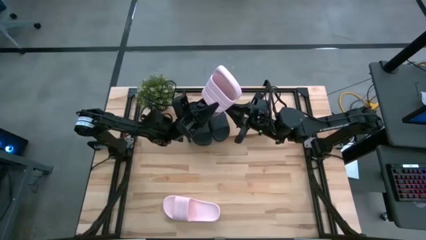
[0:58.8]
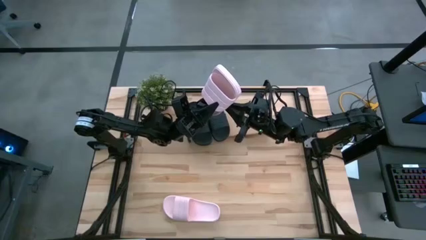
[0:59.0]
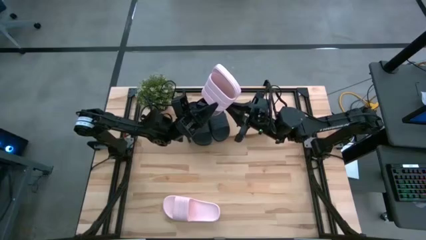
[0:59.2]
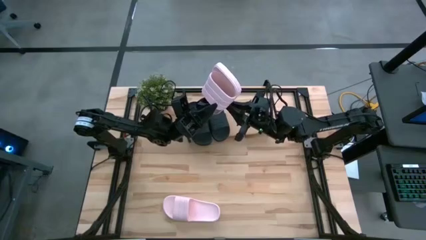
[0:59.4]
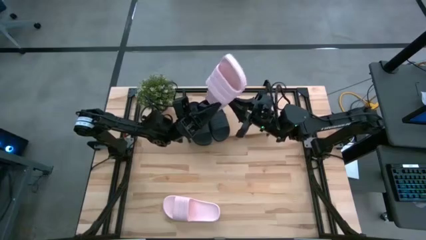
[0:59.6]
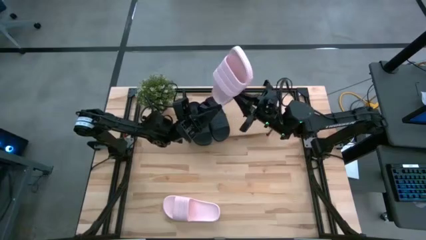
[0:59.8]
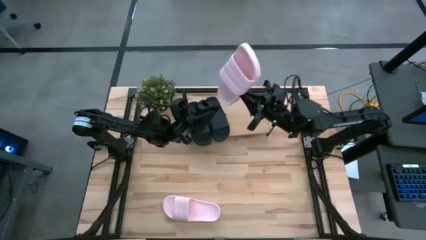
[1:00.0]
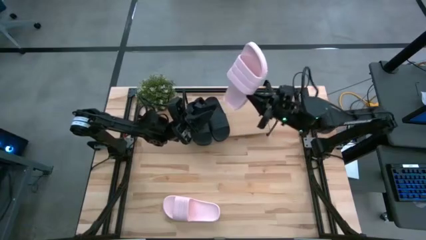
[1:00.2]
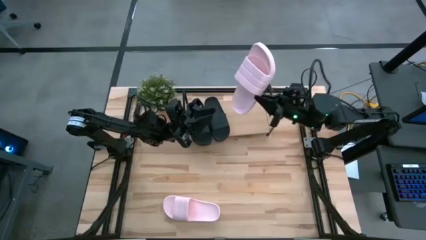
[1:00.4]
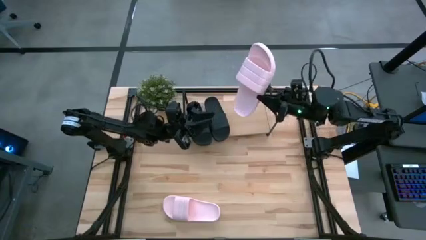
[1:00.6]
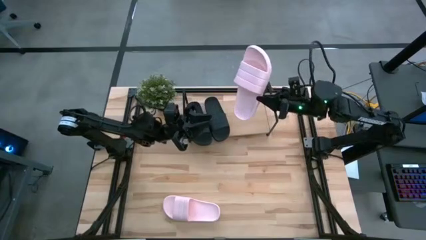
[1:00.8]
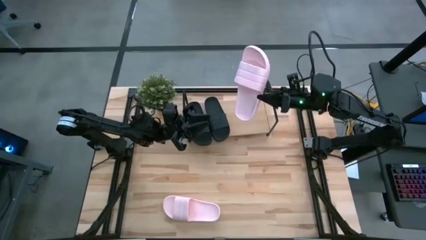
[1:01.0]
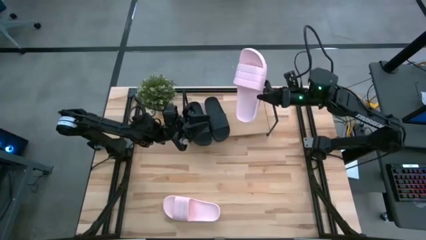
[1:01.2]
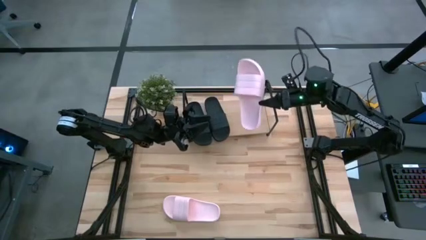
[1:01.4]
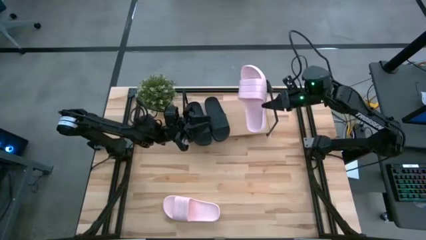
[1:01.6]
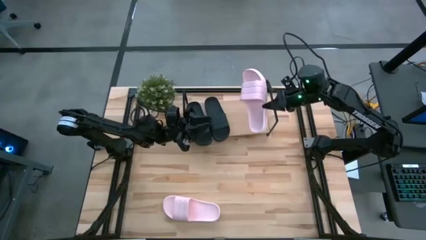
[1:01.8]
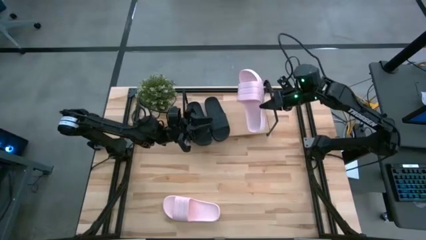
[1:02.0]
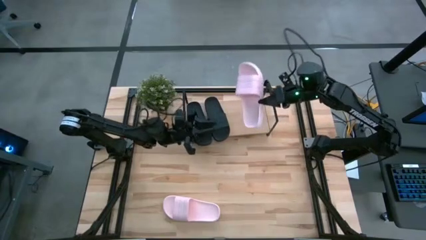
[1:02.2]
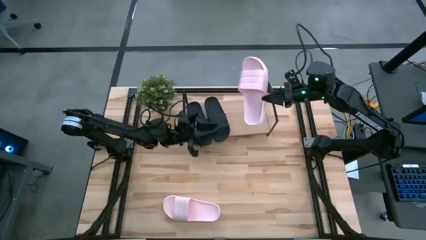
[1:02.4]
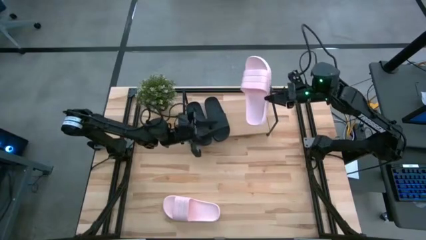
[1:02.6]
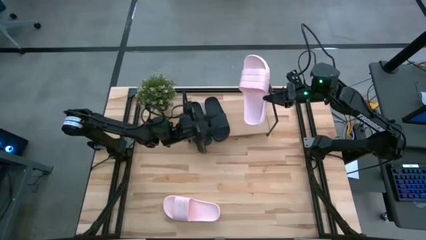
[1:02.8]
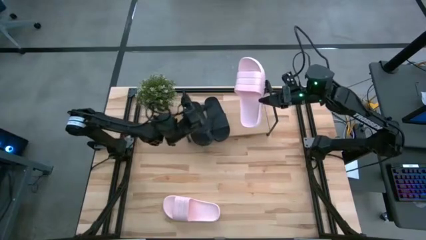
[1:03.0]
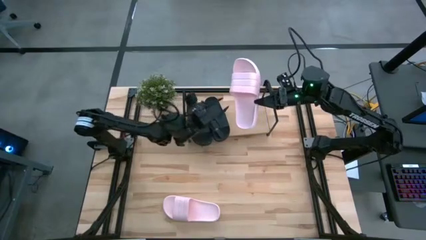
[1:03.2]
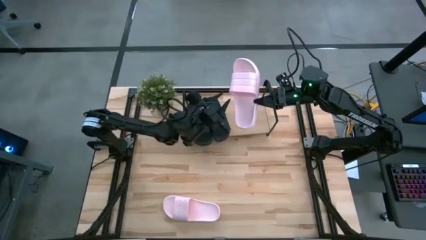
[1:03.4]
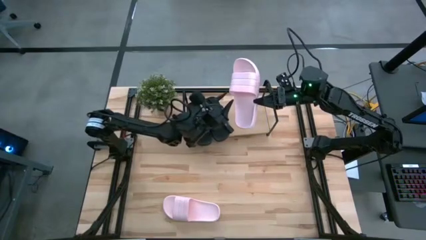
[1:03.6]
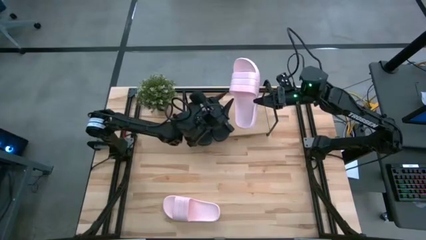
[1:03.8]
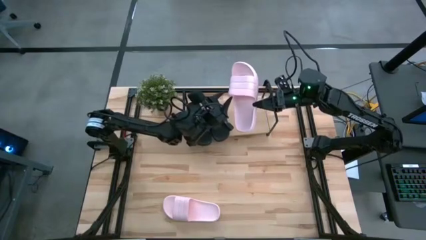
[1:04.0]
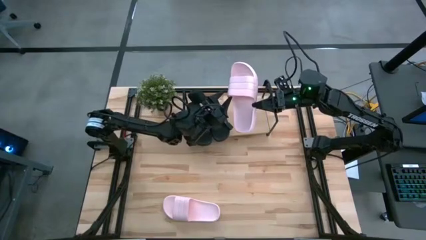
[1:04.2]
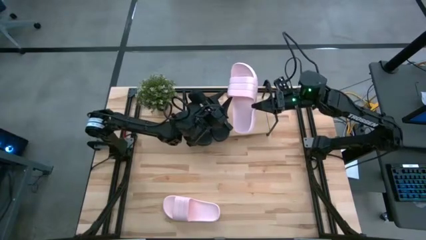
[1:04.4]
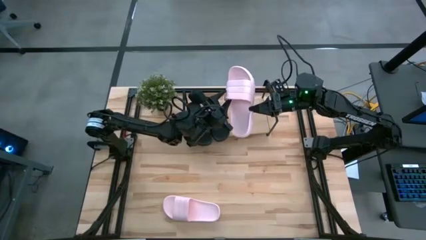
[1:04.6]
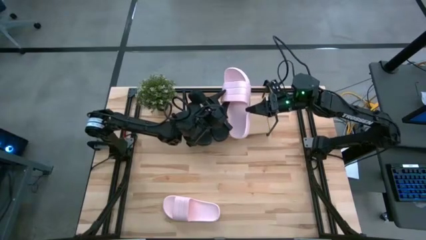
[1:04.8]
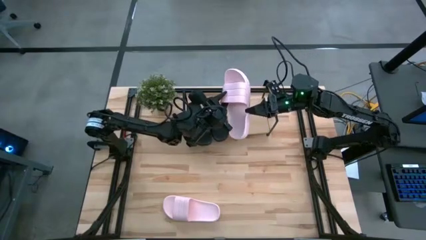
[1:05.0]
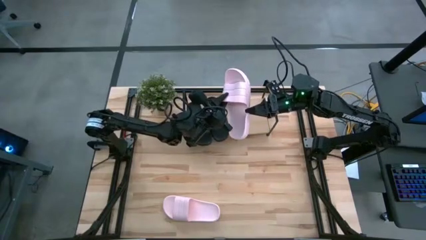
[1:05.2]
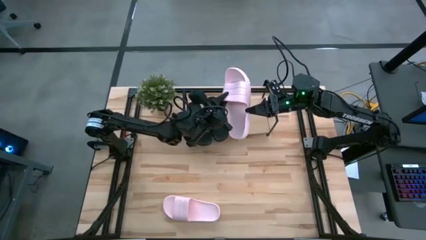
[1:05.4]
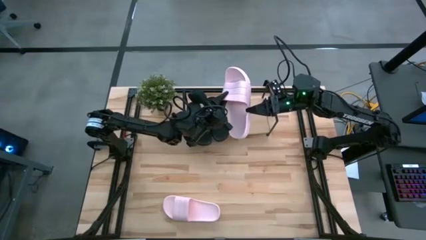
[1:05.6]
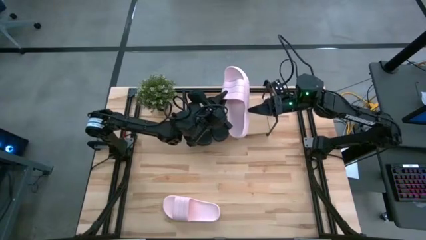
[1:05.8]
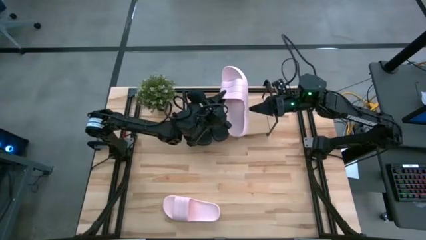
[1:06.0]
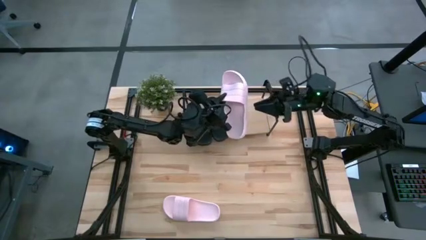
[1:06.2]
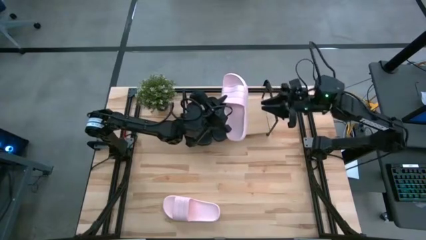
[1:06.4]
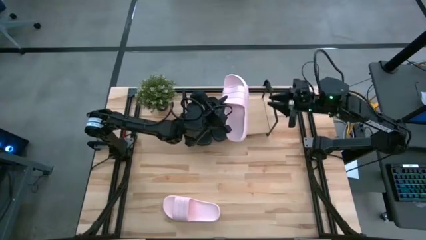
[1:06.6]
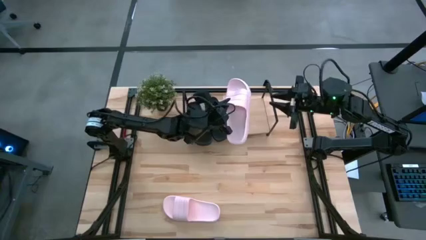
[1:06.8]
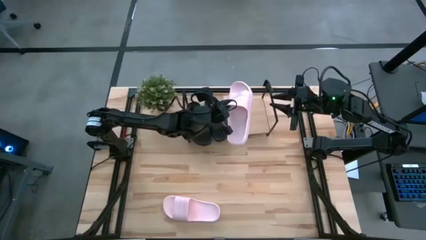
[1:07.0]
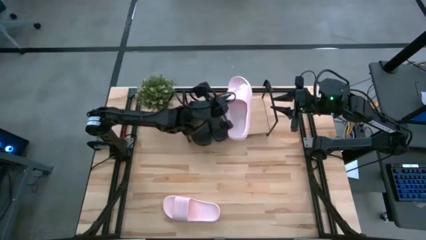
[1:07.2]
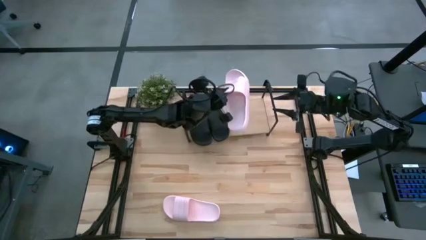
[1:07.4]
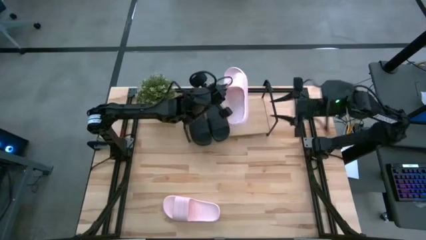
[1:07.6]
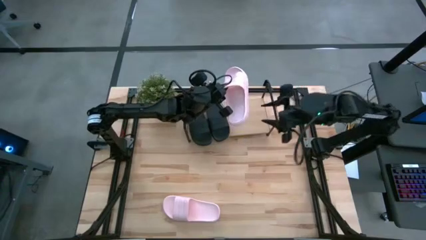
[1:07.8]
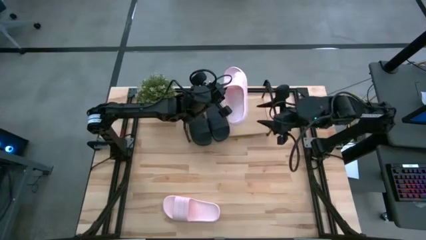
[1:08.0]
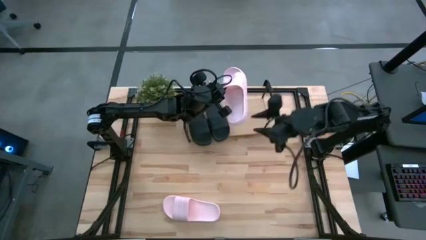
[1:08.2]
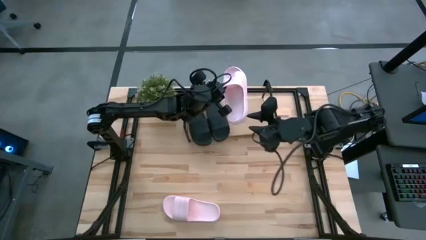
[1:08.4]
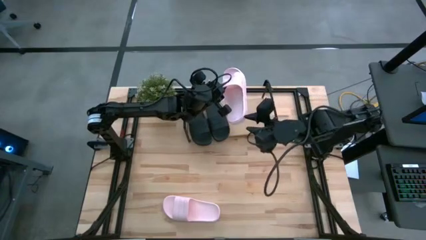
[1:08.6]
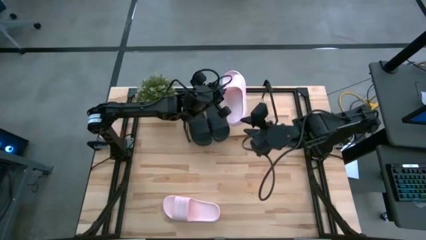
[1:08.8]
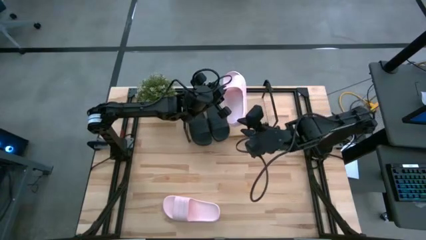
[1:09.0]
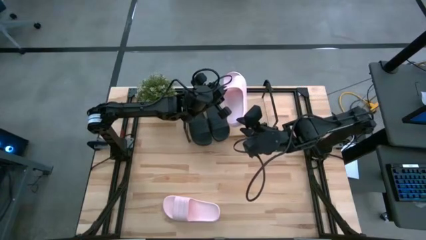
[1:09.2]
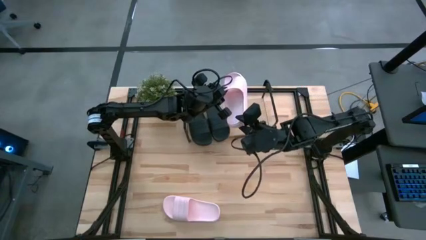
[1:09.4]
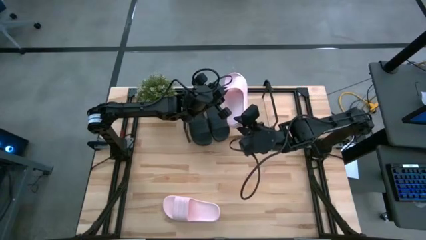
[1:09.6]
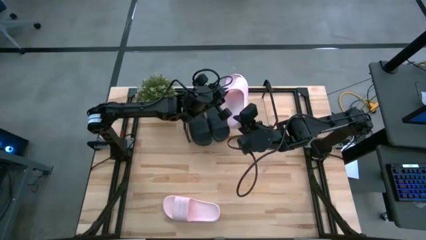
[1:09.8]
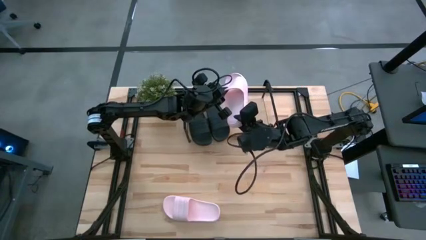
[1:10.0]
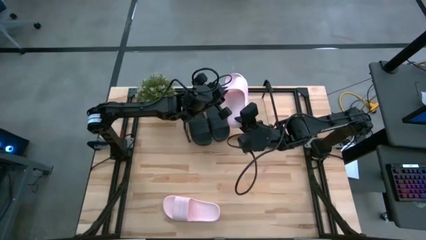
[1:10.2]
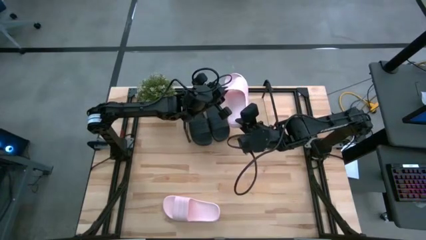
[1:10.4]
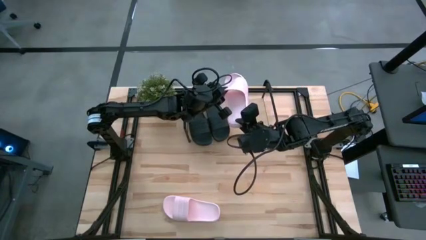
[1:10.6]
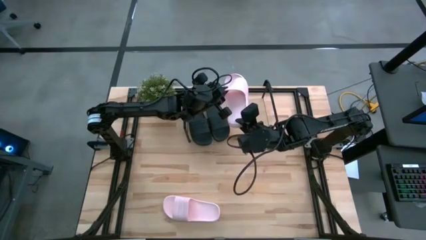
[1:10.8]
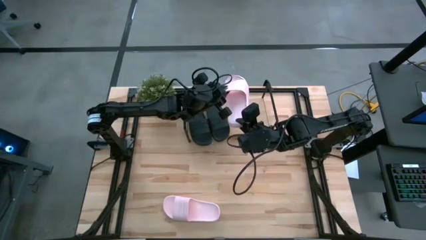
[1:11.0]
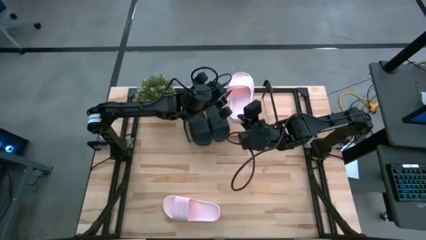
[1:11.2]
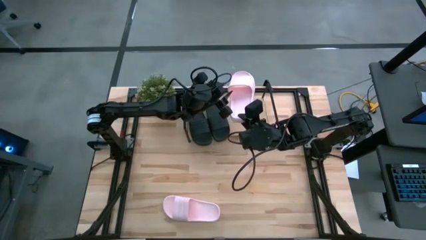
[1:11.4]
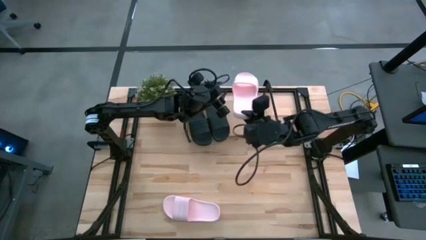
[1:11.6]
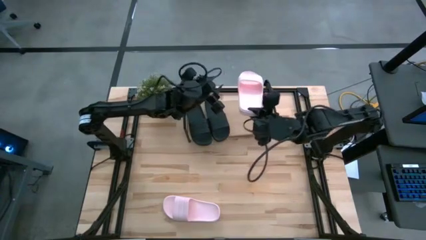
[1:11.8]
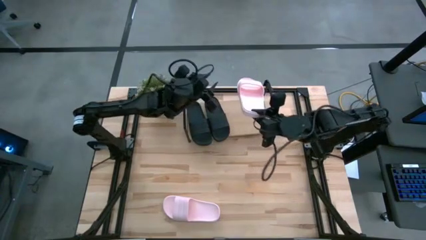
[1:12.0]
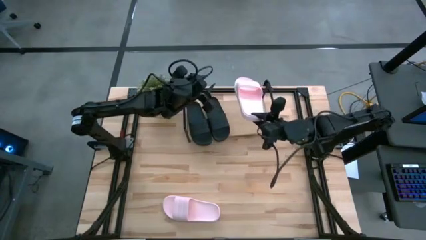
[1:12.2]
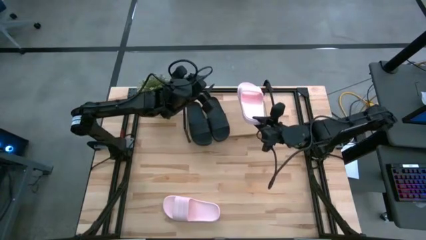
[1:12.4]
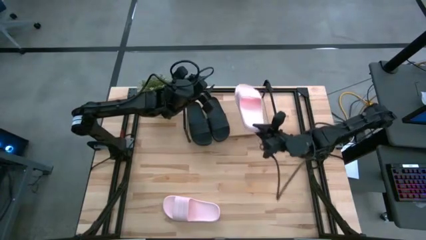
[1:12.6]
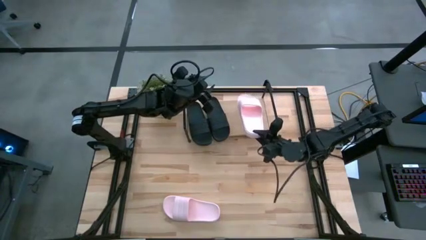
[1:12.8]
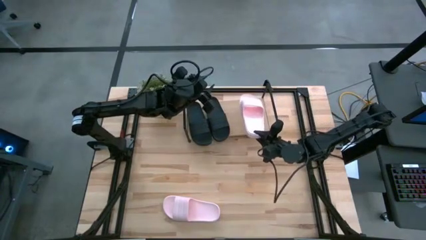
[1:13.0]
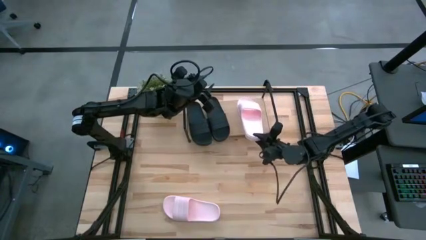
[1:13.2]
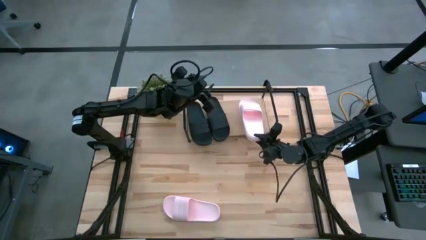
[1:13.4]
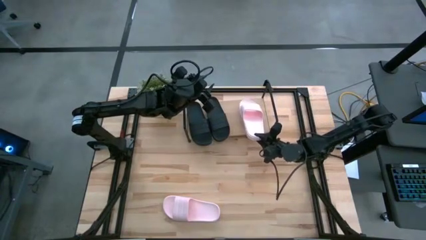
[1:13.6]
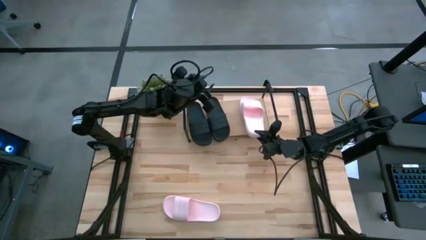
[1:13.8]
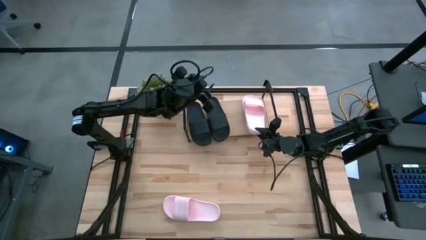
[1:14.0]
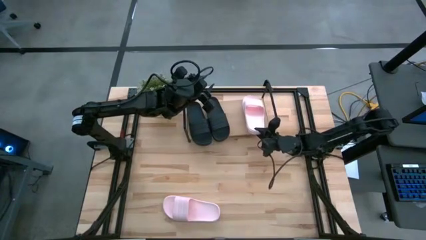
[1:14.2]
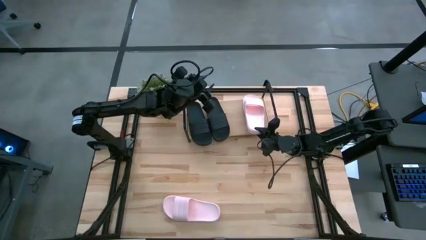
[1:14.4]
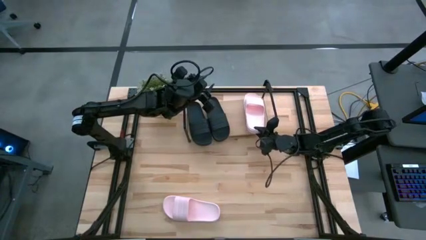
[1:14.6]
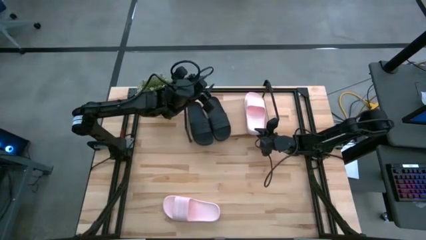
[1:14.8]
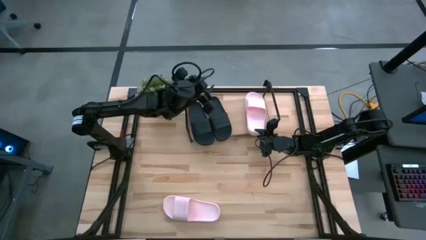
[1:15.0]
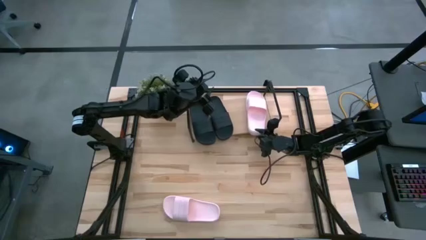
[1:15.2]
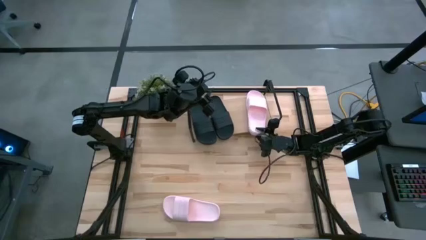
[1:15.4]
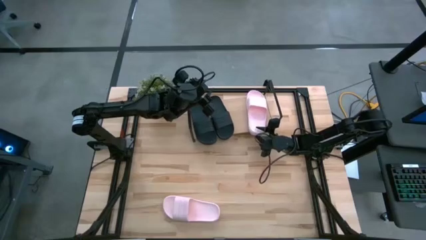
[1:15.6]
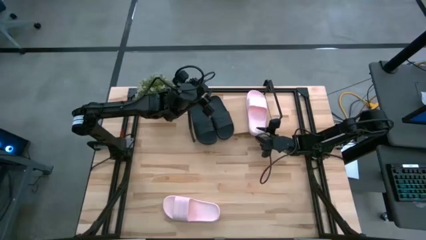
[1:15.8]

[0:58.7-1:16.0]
Task: Pick and place slides into the shelf
Put the left pink slipper on the shelf
